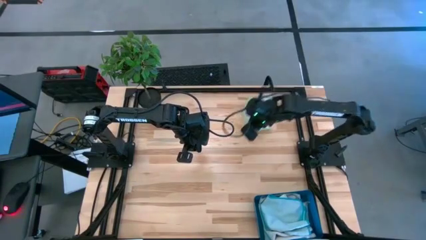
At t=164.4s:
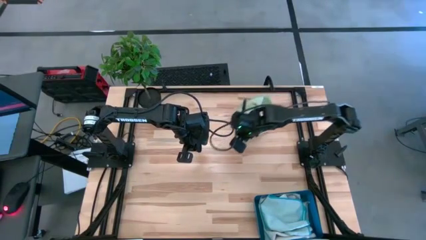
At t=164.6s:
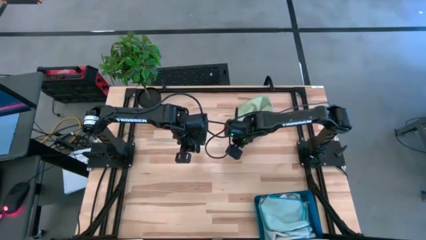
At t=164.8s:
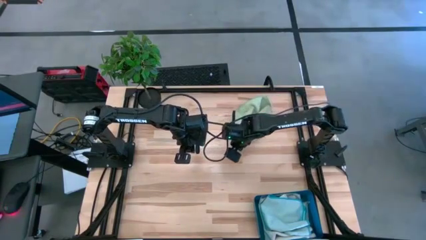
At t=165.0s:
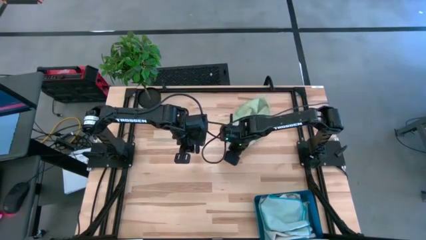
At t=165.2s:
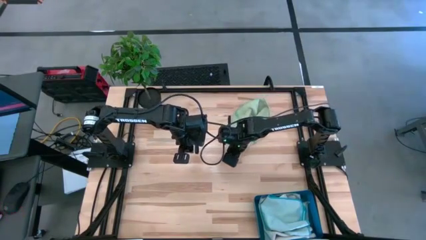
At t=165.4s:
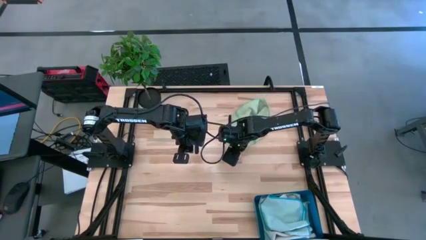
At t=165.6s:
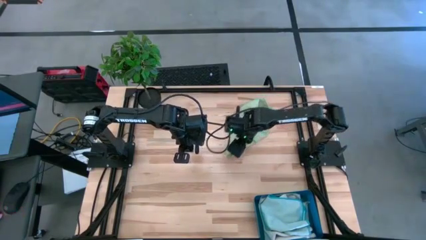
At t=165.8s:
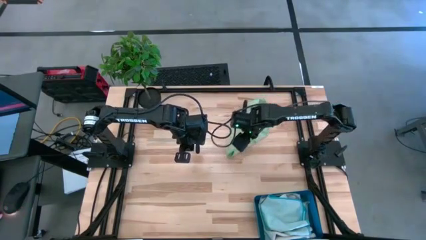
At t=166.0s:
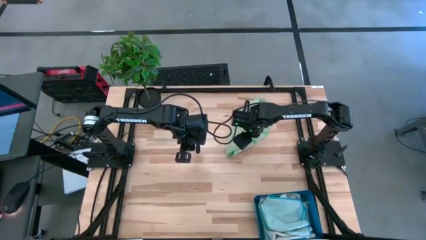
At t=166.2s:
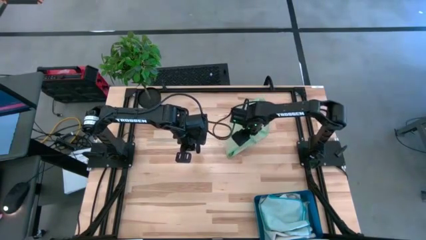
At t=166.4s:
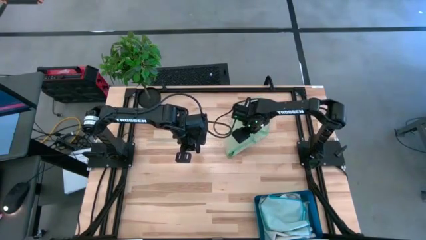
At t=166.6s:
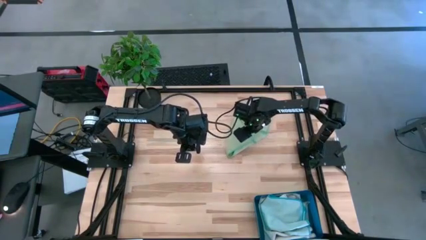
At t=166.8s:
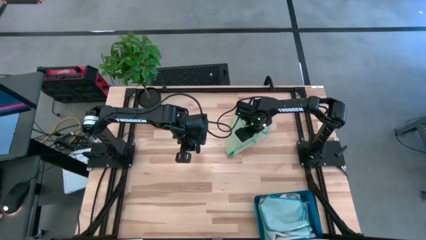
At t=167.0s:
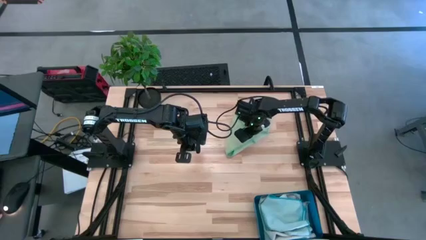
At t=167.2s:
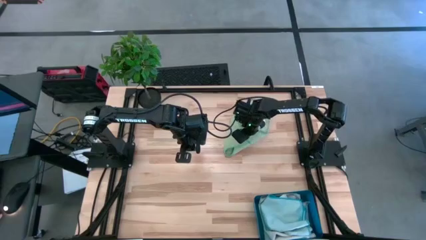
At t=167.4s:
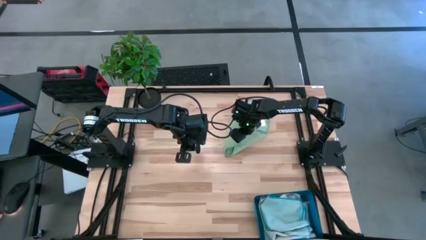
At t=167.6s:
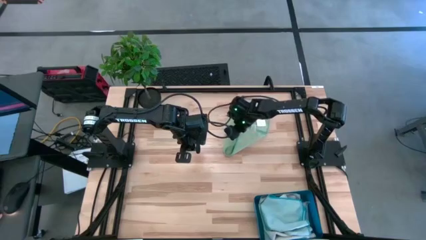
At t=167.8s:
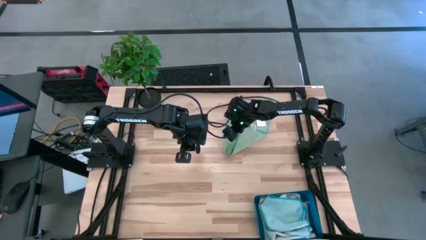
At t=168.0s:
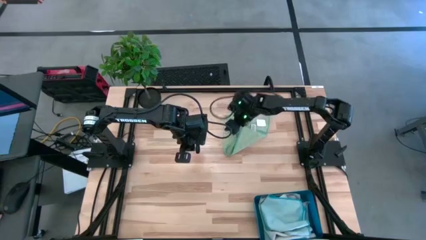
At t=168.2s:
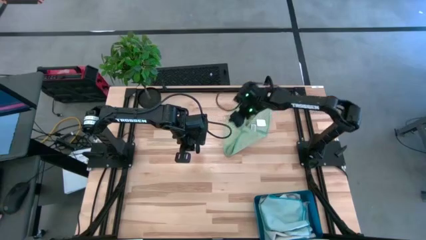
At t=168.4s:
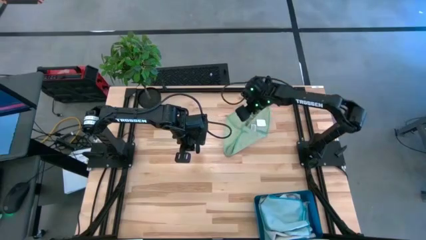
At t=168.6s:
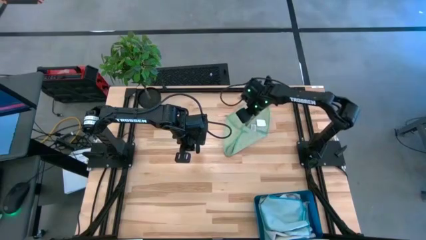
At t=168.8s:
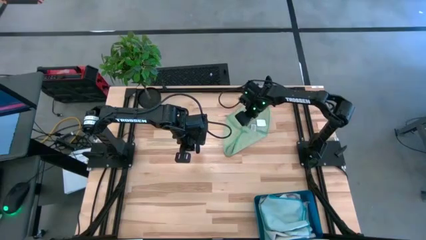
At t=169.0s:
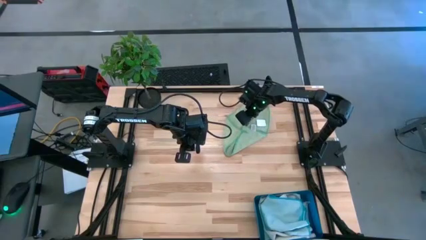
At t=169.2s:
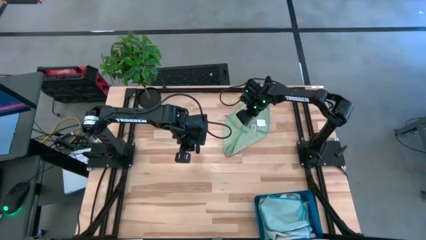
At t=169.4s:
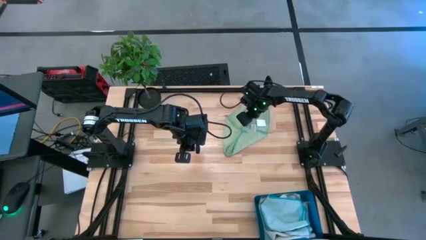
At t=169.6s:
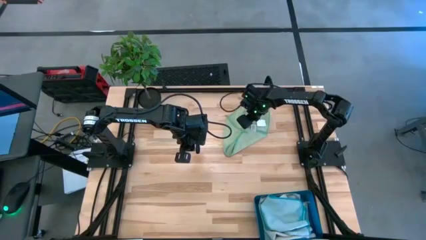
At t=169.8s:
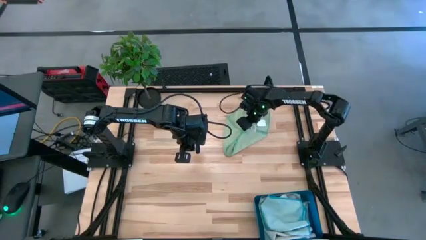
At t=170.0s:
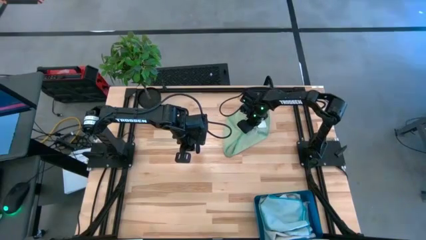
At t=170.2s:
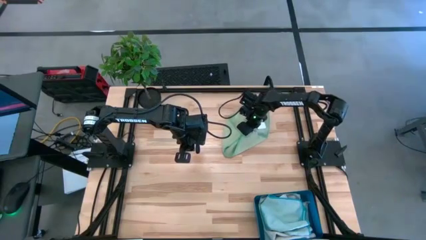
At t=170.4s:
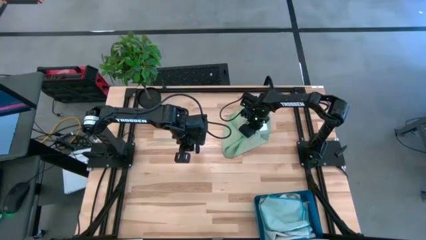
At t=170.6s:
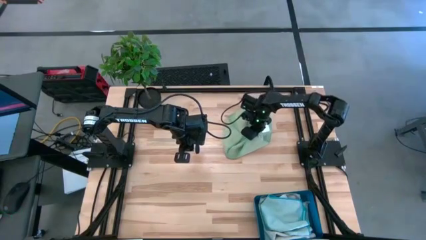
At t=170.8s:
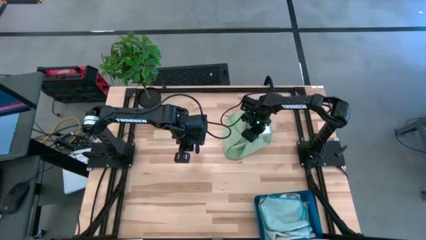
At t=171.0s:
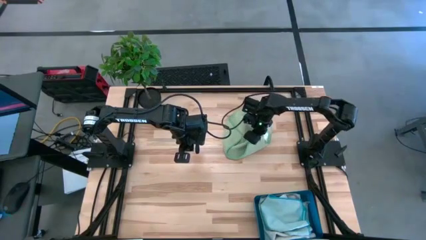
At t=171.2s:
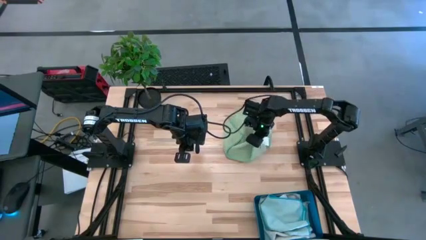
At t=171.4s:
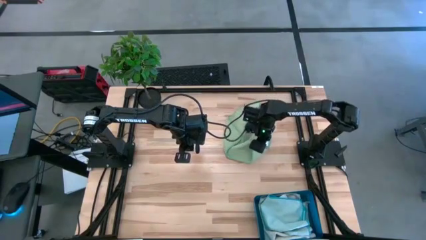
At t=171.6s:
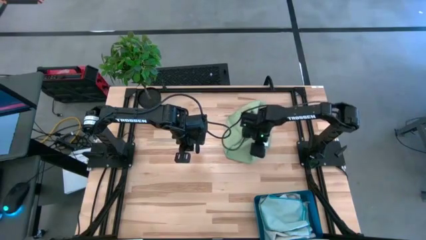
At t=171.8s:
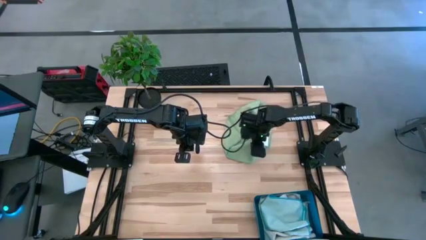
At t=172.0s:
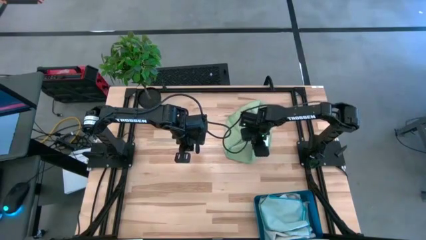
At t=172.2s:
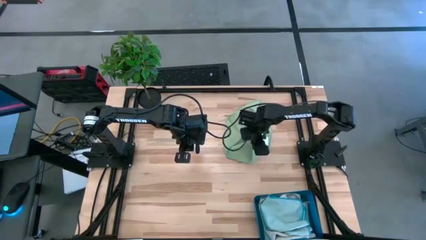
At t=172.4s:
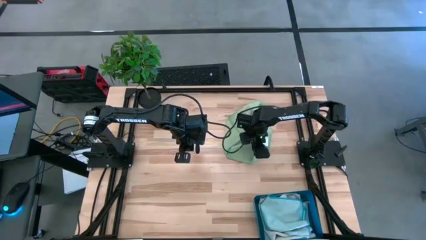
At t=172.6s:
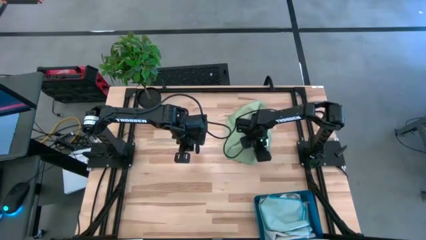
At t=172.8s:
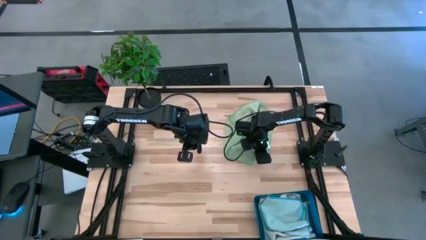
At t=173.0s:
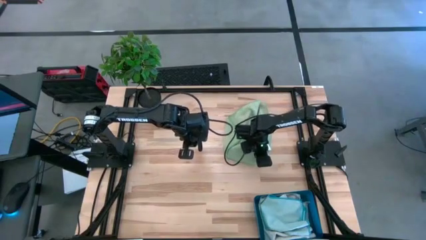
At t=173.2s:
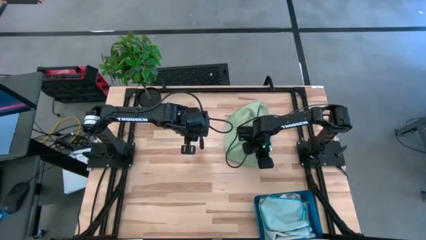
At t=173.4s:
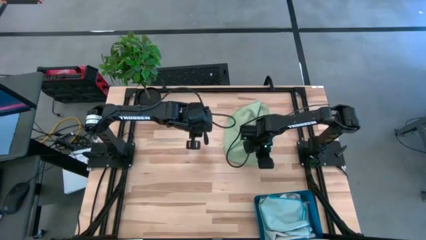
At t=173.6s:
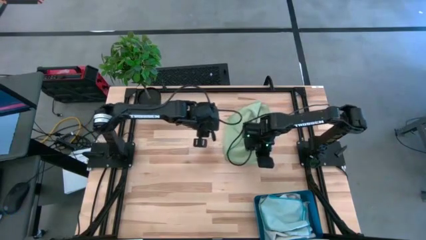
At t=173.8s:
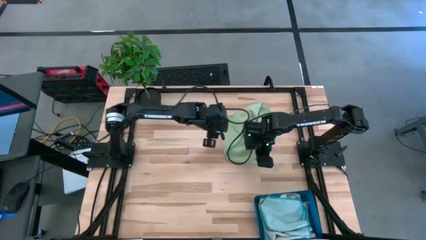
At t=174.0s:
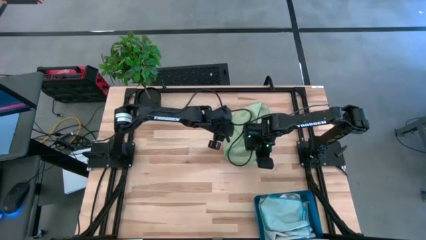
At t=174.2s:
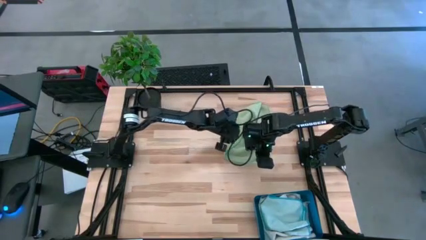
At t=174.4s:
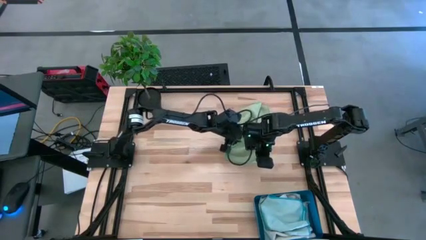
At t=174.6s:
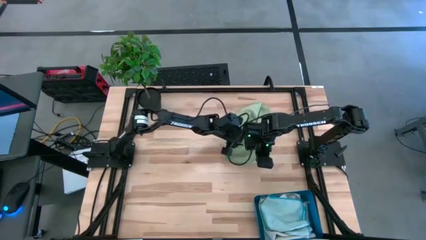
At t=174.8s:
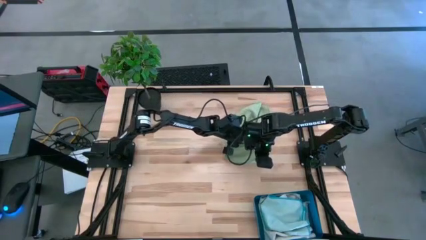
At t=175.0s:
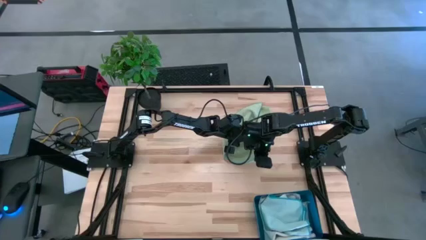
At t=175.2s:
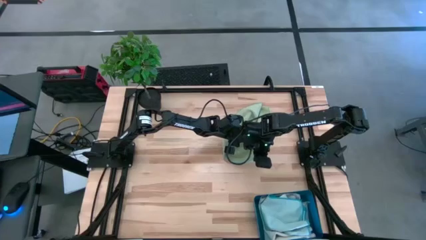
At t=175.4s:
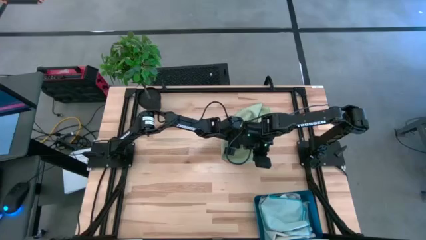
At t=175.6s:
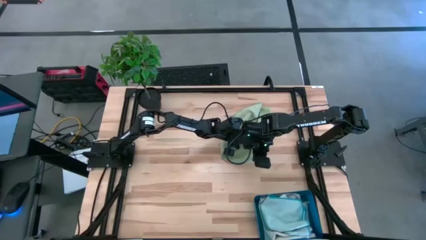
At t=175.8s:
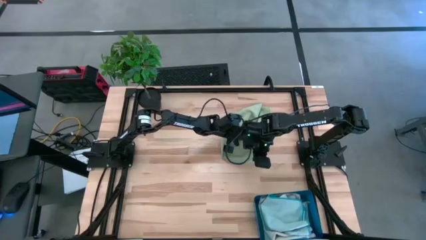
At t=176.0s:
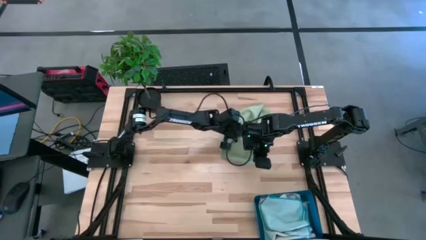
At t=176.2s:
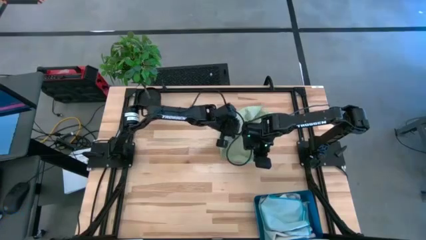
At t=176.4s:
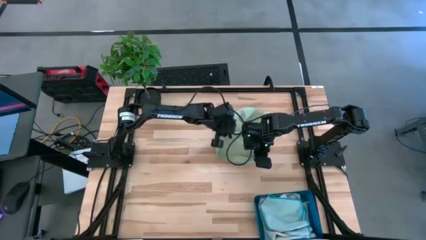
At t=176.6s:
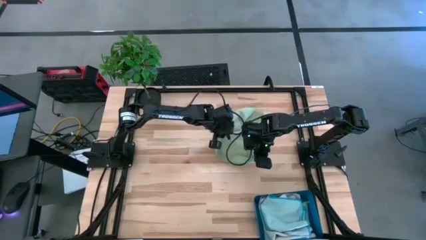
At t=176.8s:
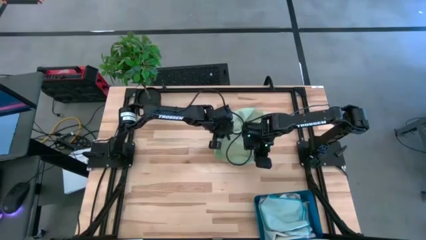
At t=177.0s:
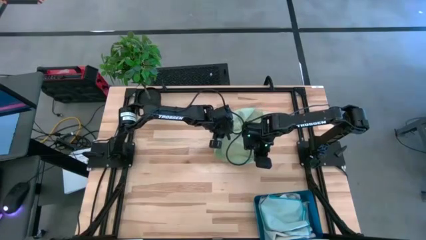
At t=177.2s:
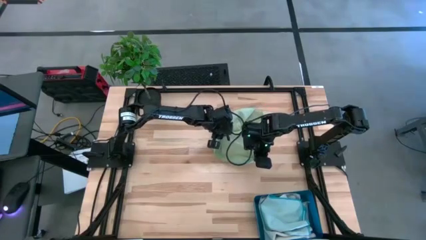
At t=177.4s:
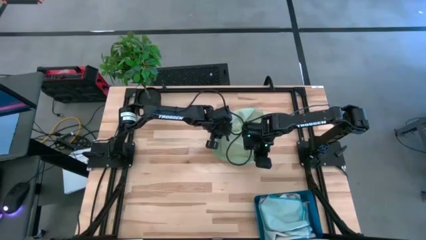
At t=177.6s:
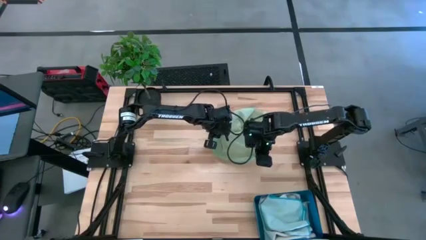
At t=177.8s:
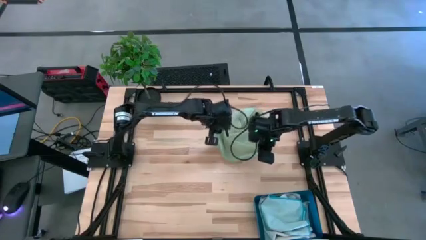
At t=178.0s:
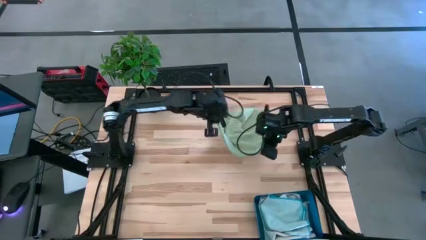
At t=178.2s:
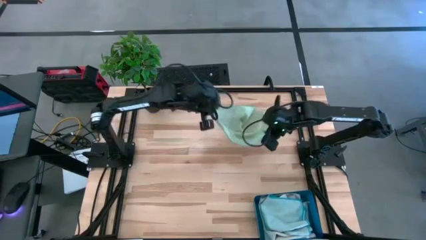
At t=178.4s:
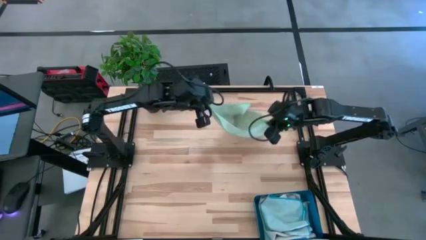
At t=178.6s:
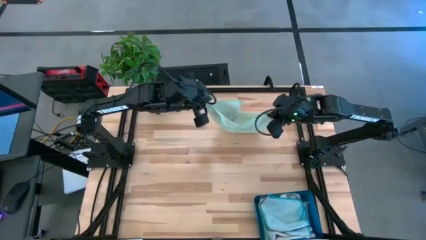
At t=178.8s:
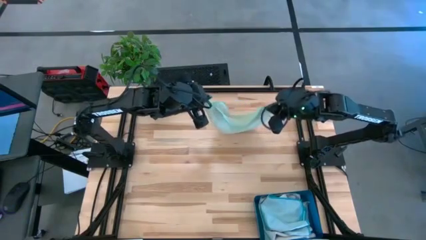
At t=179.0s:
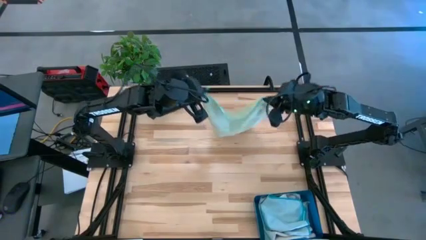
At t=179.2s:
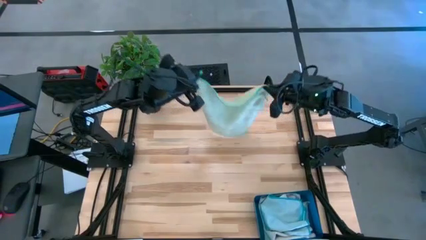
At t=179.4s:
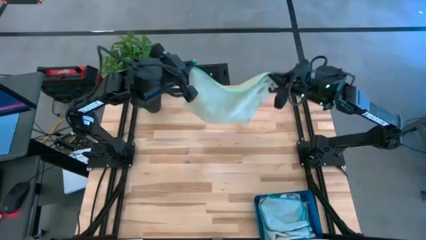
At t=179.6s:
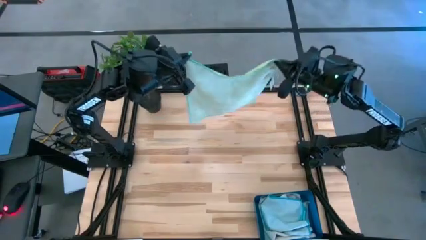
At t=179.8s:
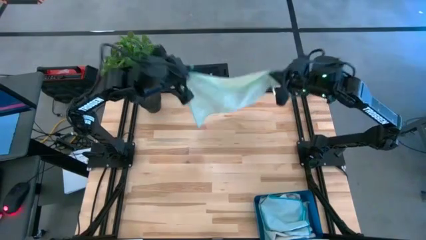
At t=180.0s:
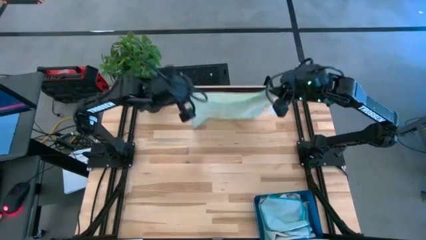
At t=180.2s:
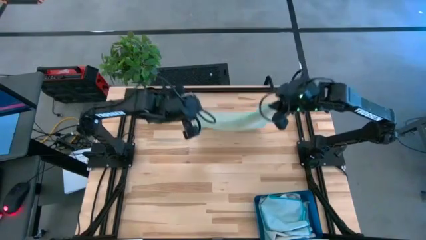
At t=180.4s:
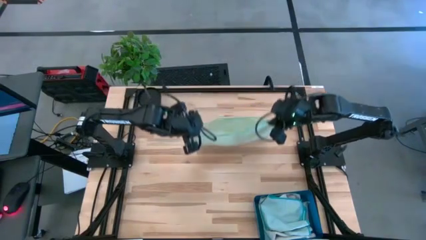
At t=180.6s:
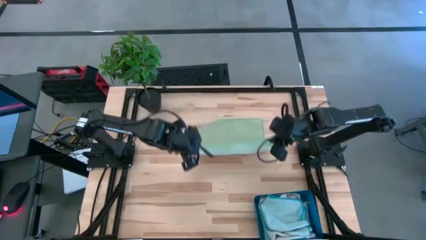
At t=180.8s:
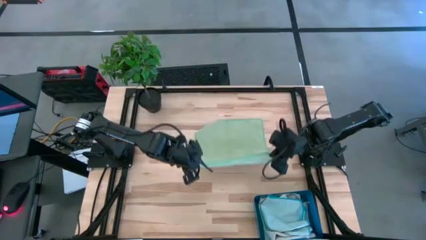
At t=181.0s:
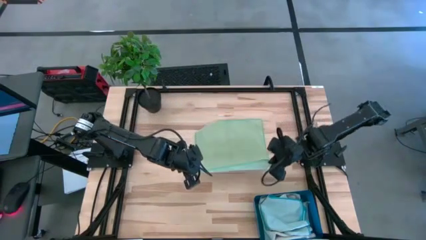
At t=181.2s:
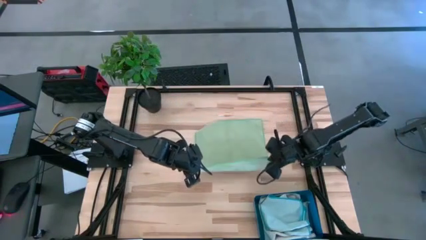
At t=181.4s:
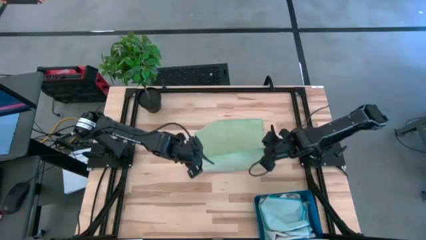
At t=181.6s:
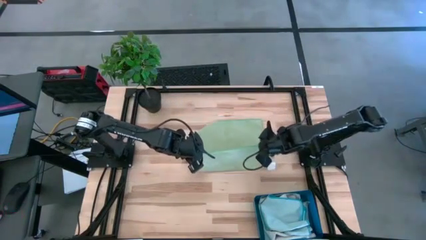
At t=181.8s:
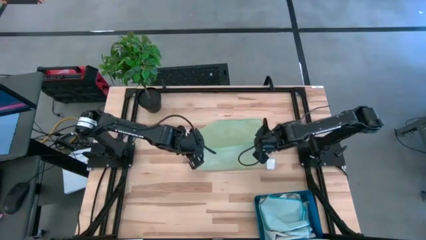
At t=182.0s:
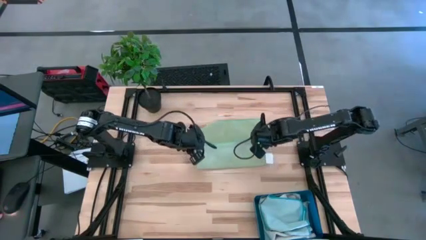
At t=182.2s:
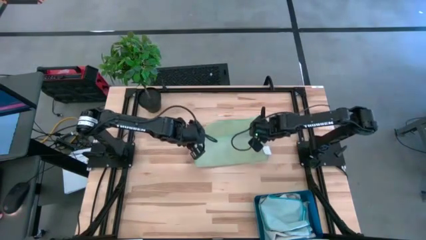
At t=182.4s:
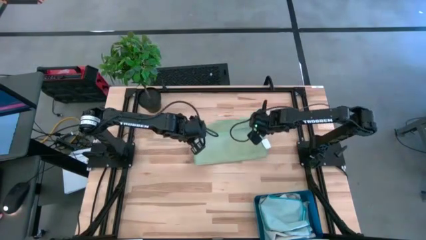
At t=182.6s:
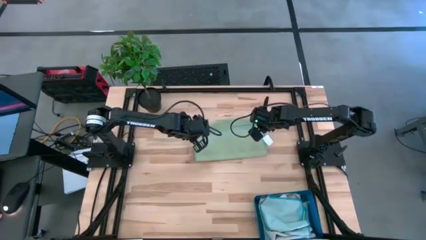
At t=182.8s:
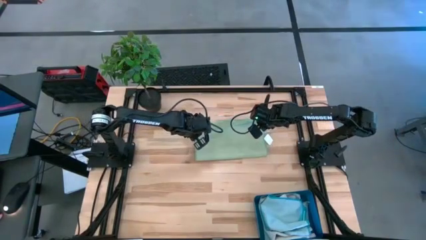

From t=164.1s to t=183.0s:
Task: Fold microfiber towels
Fold the green microfiber cloth
